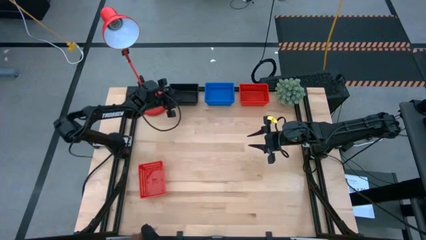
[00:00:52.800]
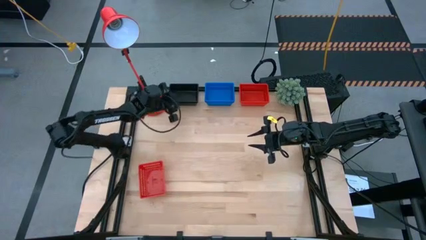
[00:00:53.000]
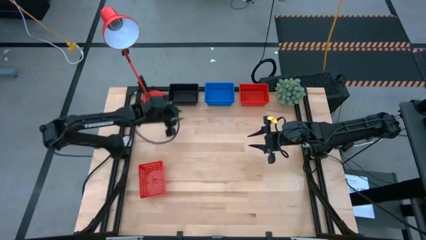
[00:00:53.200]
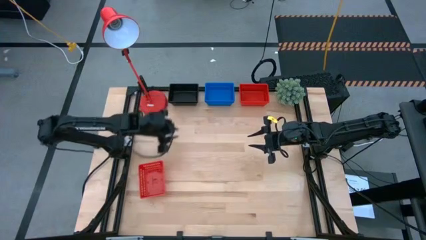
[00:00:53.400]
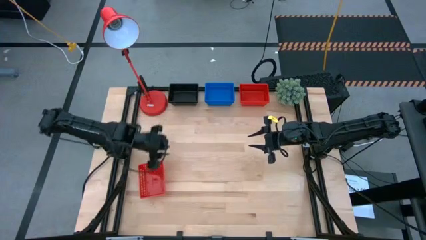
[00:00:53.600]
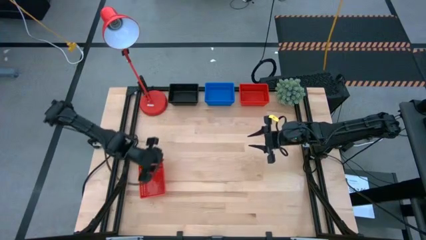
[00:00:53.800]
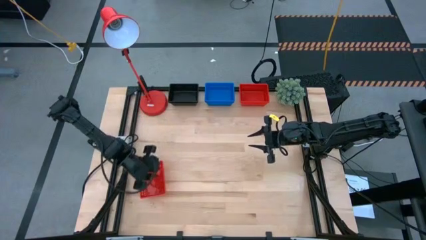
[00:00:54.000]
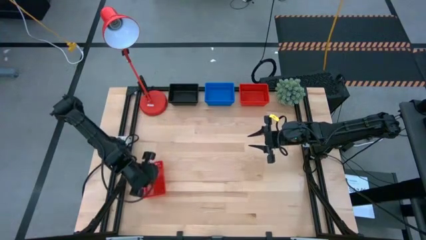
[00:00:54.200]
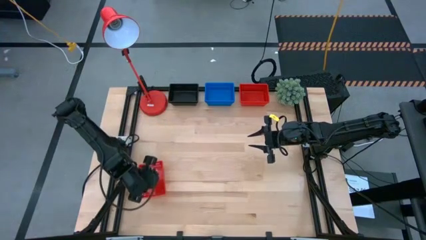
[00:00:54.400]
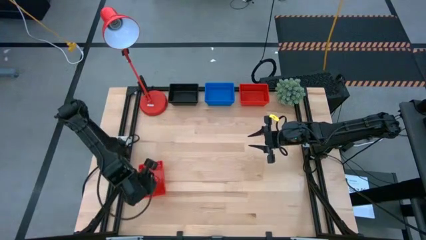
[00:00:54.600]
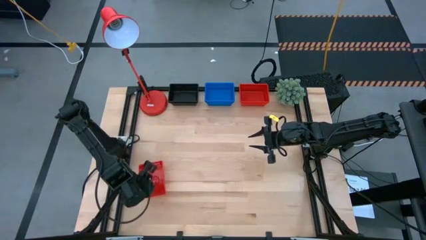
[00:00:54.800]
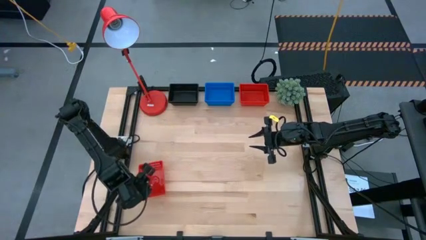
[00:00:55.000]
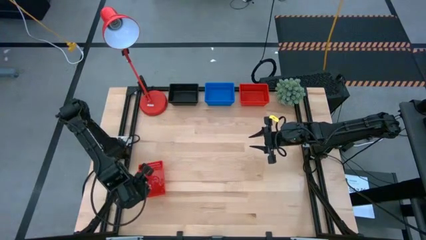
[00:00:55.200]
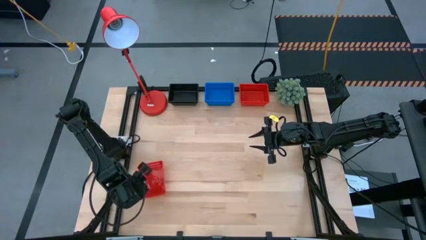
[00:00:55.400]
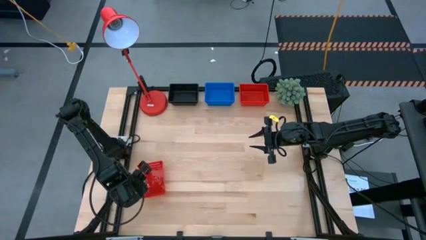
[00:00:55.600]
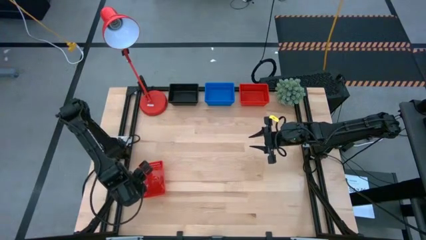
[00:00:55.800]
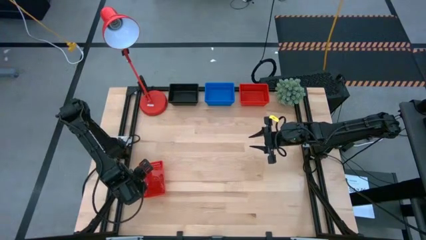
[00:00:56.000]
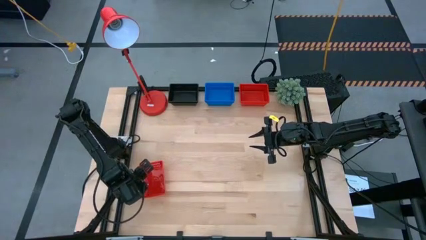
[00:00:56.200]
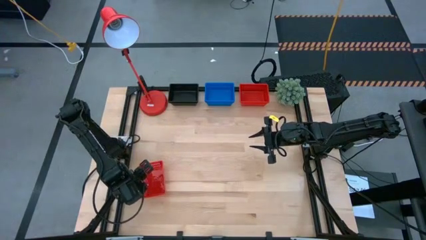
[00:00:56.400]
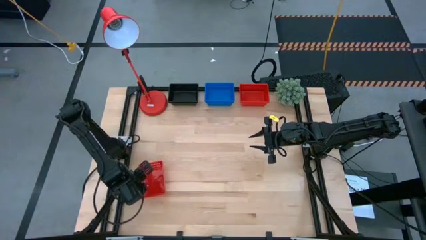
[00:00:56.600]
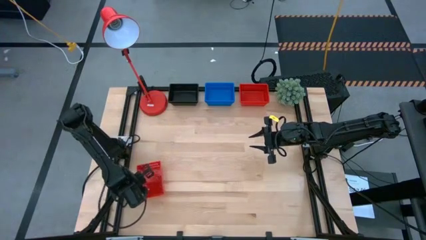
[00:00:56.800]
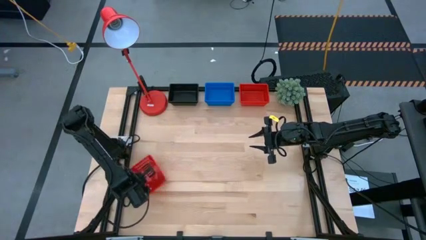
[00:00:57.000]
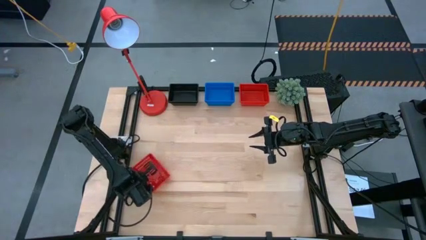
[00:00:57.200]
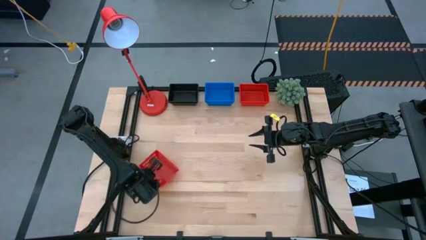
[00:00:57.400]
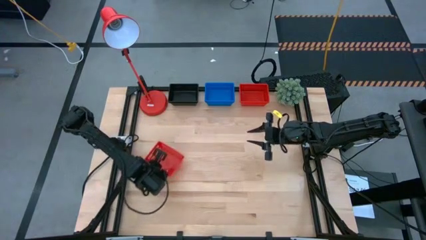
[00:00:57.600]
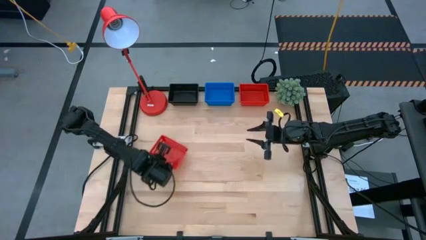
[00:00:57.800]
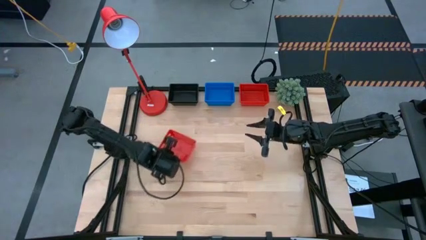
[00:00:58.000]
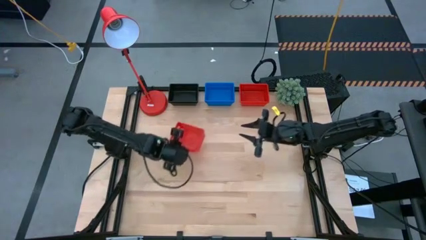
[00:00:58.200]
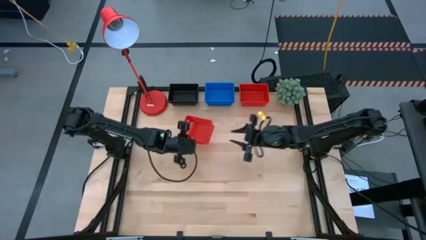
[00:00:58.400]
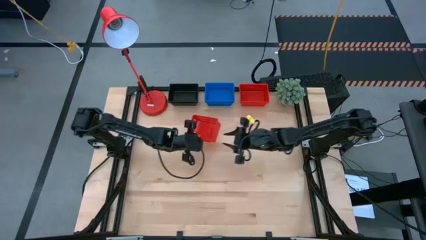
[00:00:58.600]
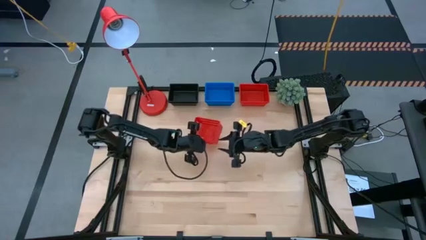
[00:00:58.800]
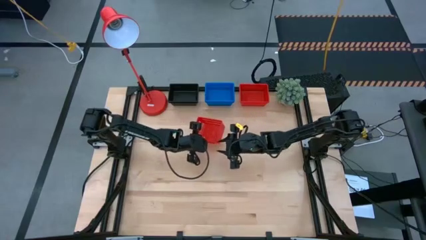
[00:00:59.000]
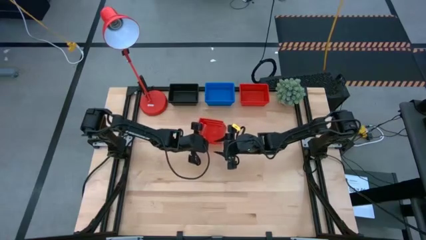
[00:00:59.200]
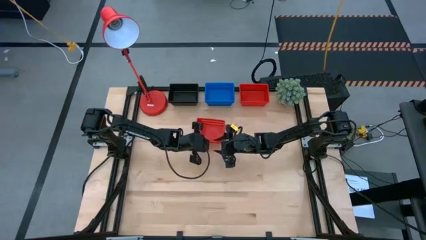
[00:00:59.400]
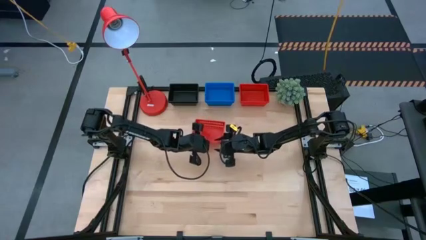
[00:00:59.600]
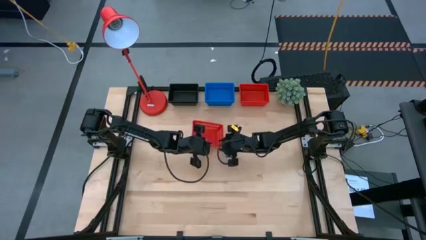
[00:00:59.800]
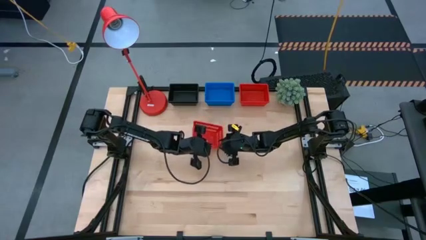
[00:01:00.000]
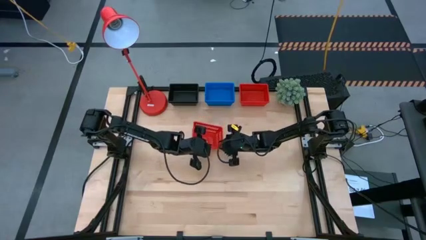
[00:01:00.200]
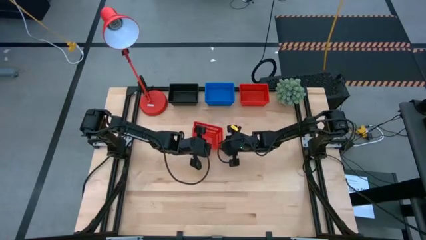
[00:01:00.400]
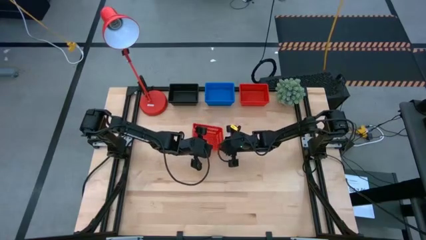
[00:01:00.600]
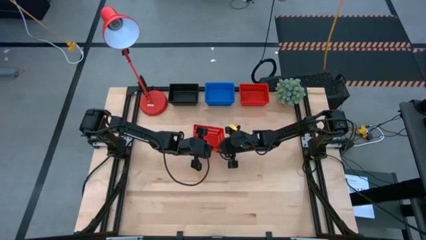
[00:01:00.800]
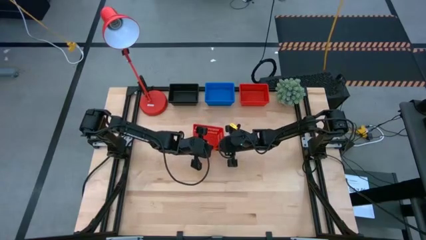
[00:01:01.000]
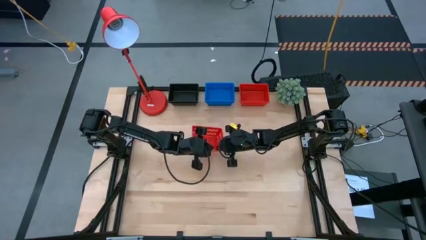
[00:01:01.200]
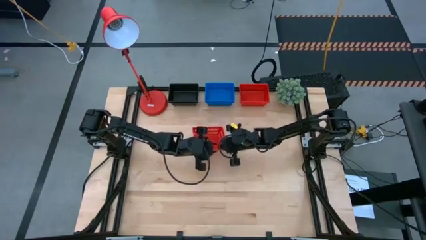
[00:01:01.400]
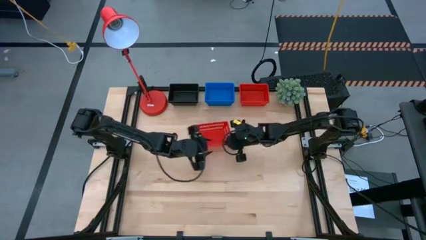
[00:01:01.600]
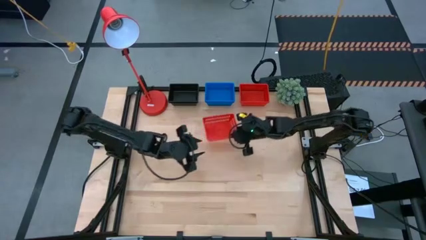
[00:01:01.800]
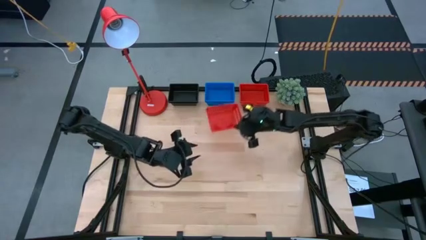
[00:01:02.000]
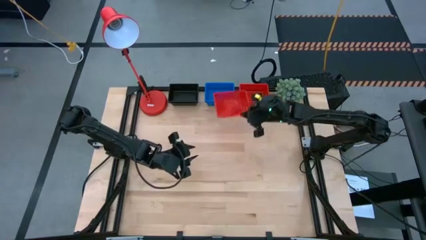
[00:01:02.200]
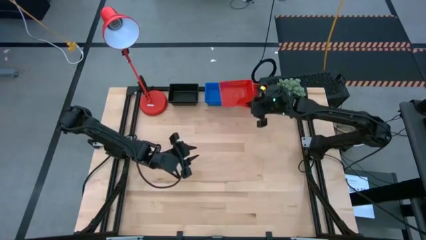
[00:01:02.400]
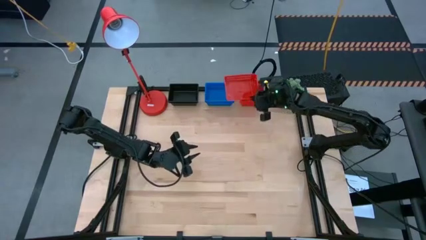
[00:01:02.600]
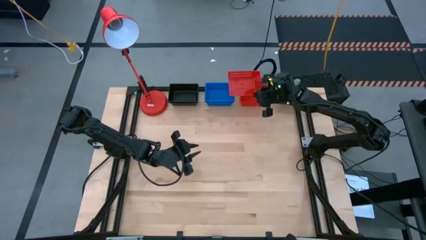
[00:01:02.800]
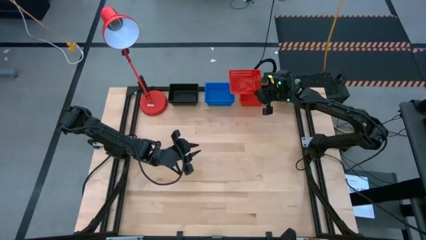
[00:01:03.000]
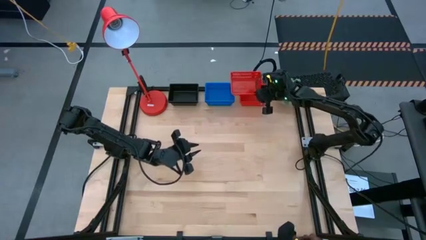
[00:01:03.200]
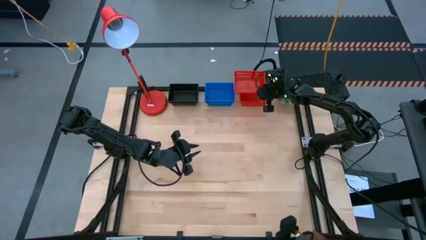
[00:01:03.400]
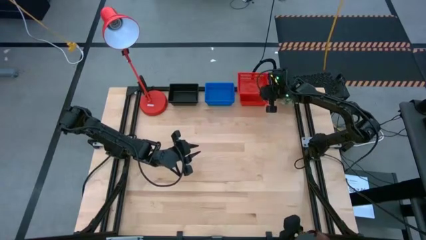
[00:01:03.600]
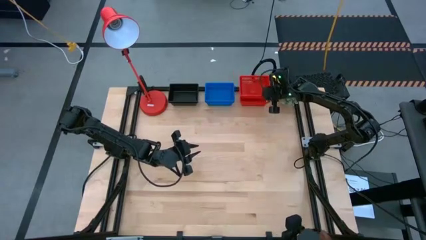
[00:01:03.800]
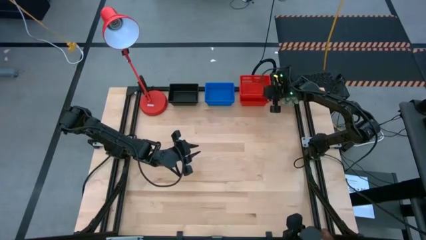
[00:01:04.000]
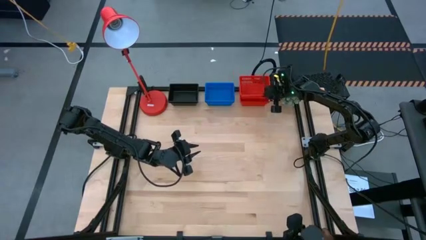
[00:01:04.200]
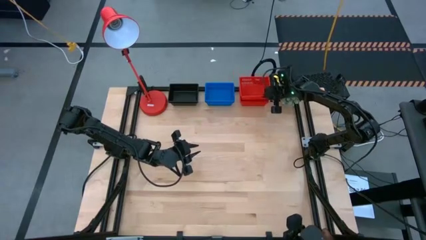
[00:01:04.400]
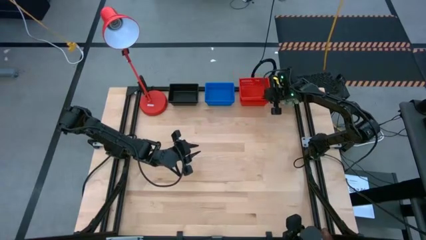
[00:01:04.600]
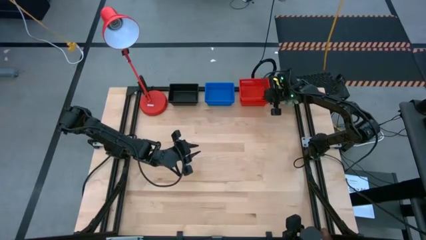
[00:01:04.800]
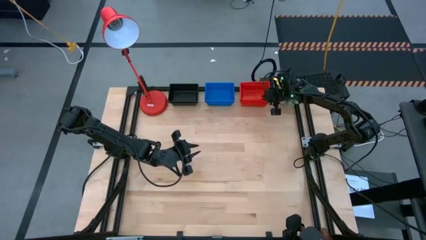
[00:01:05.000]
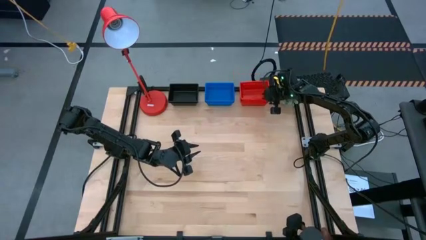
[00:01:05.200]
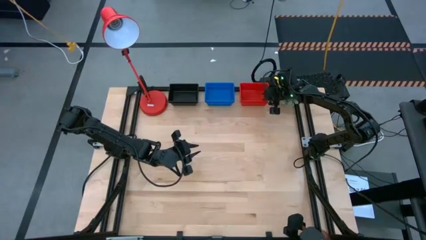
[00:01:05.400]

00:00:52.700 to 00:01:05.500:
Stack the bottom red bin on the top stacked red bins
